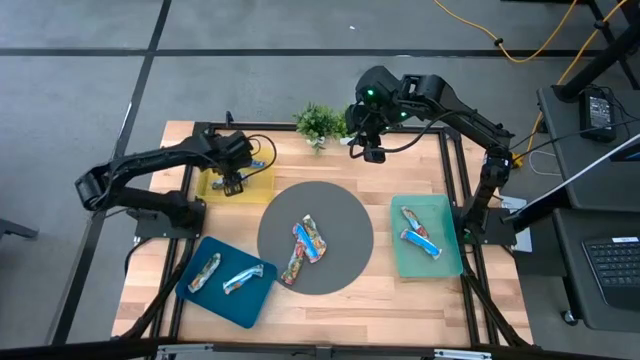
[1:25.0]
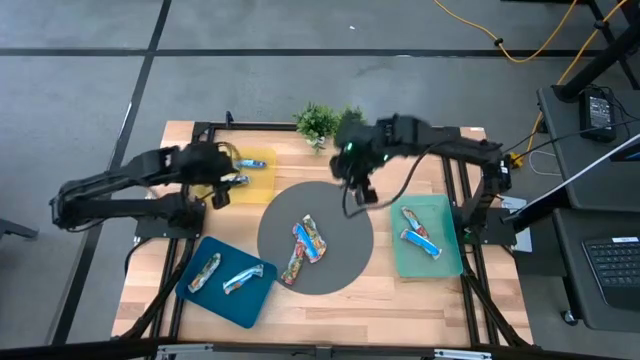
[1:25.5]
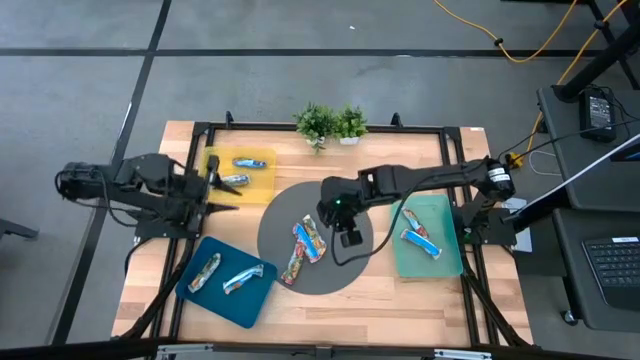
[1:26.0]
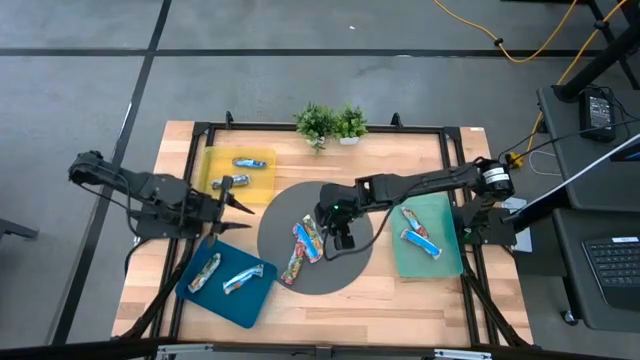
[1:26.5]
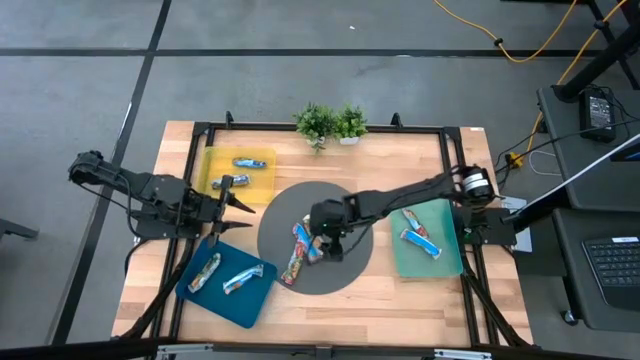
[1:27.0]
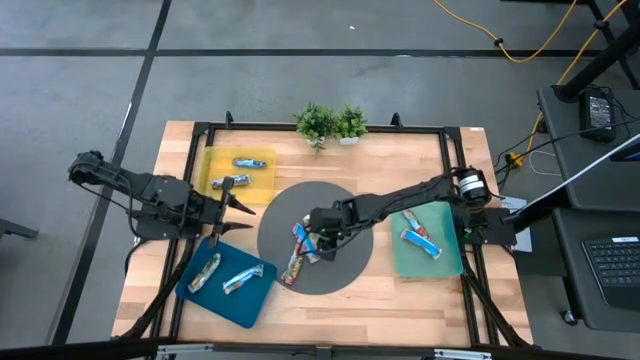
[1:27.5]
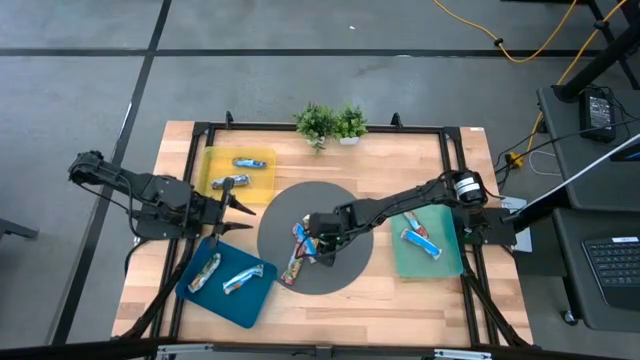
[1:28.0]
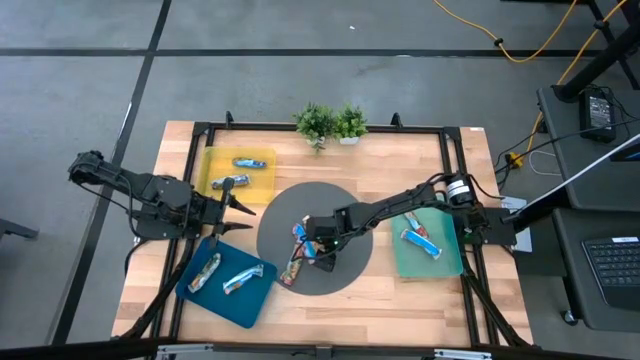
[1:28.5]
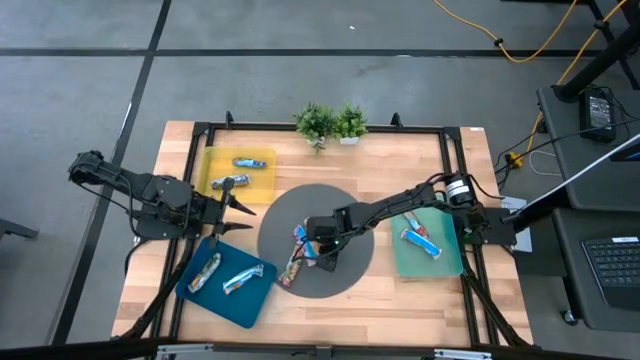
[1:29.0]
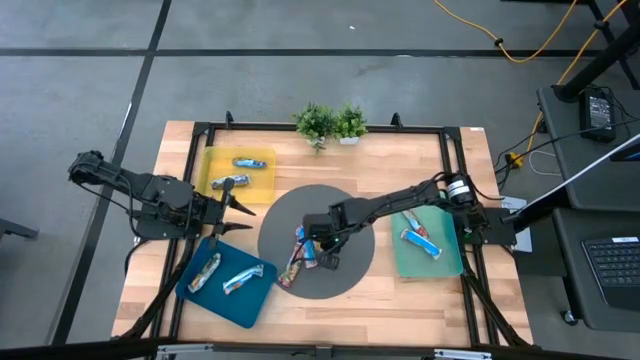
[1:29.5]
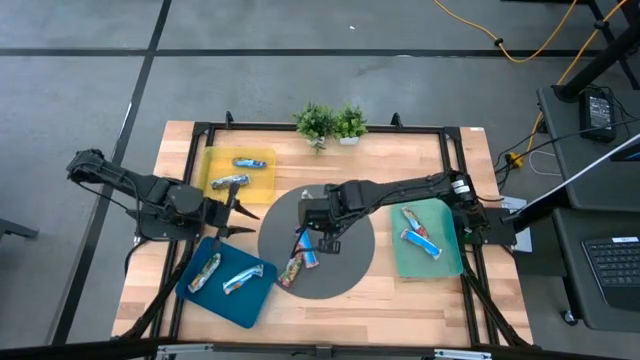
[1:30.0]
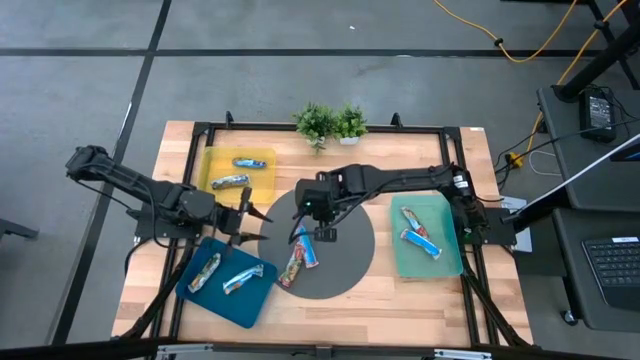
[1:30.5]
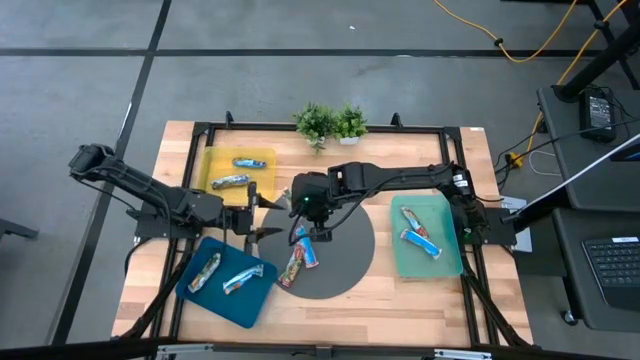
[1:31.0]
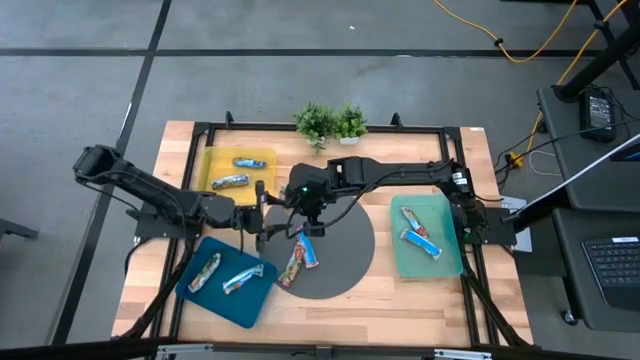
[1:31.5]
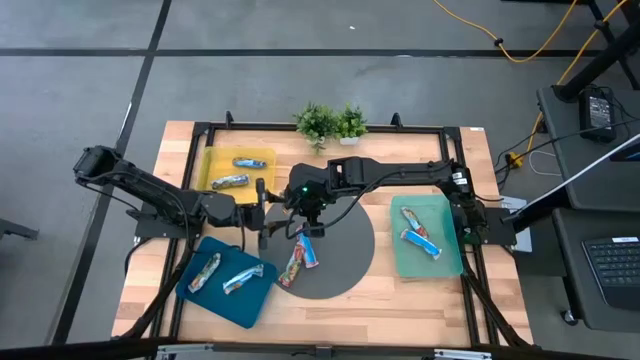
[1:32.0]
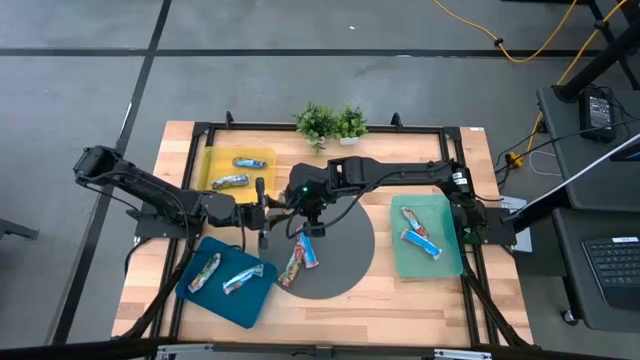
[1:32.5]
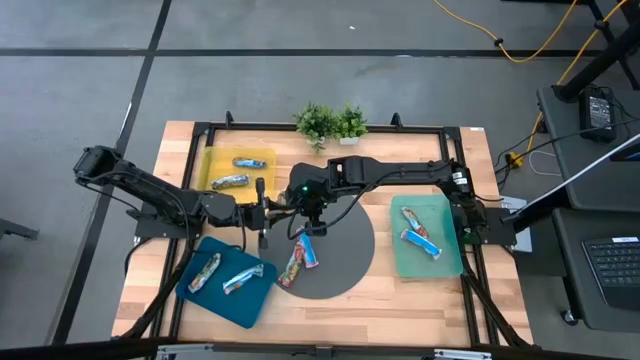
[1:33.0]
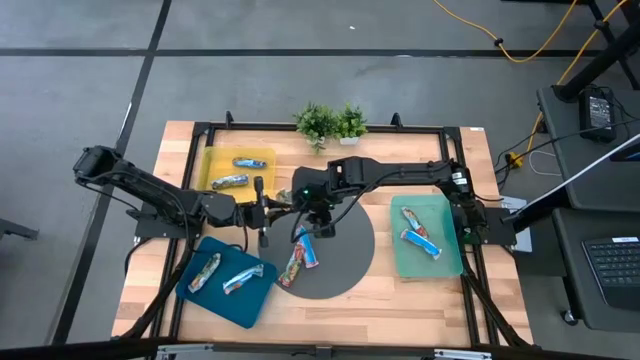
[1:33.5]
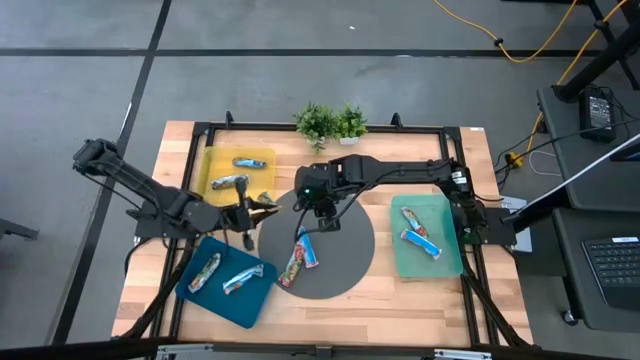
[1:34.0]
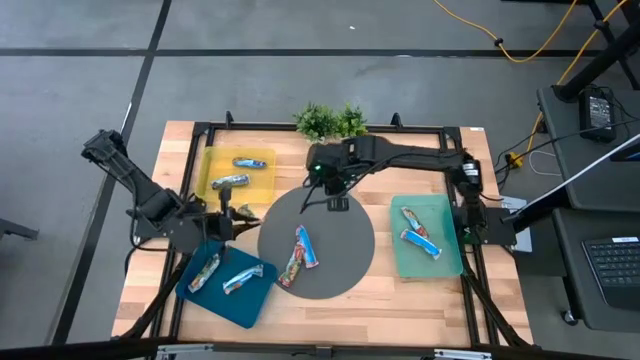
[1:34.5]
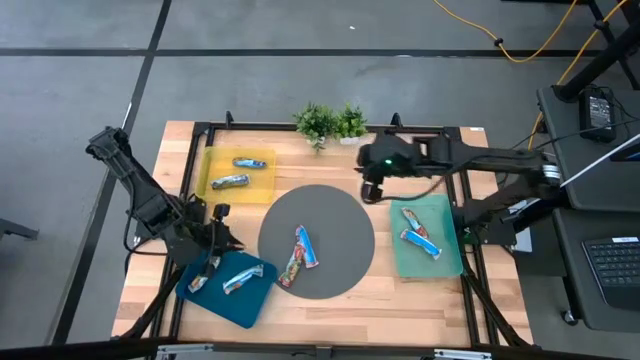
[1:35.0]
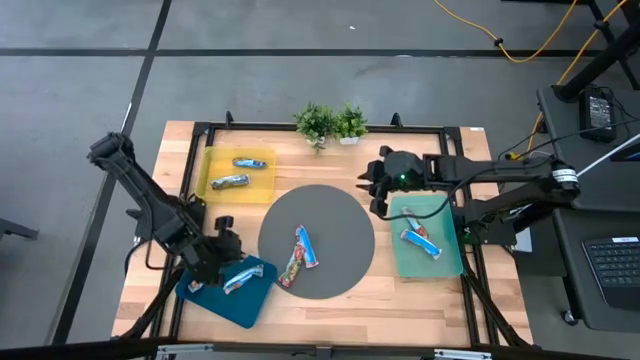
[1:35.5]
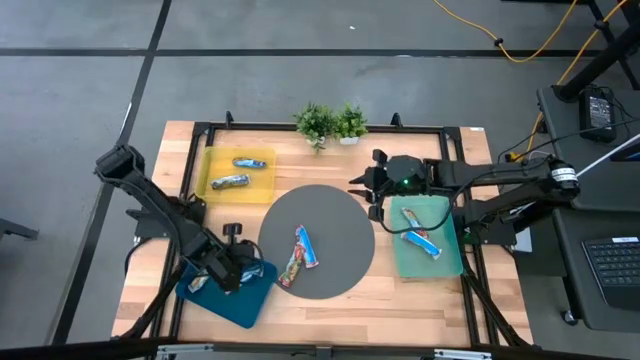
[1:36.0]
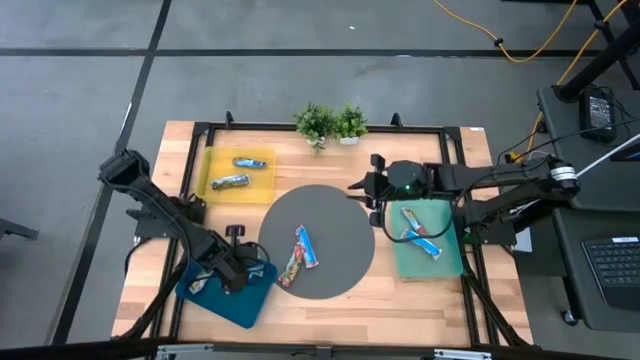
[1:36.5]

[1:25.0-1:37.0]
Task: Pick and place Granola Bars by type
Put the yellow granola bar into the blue bin

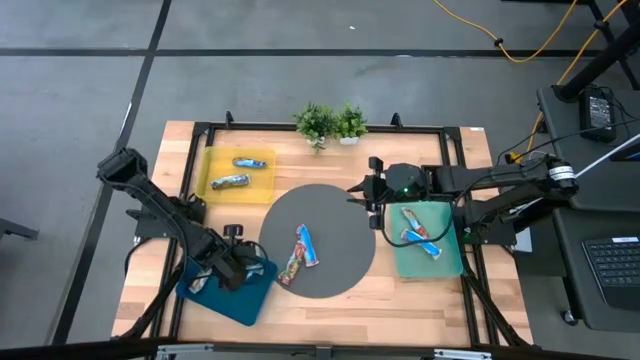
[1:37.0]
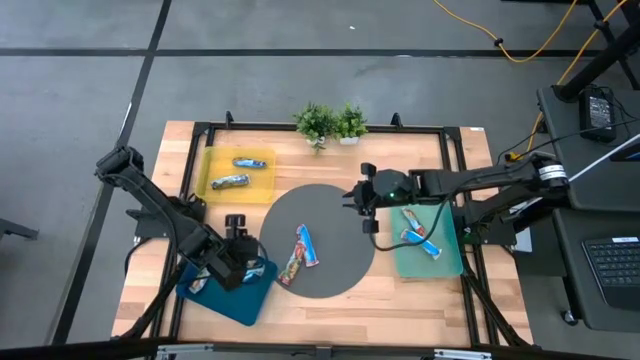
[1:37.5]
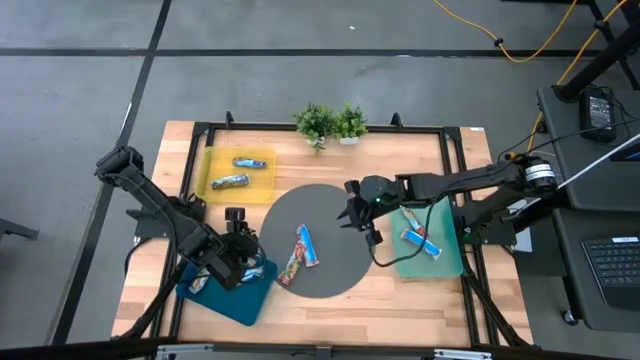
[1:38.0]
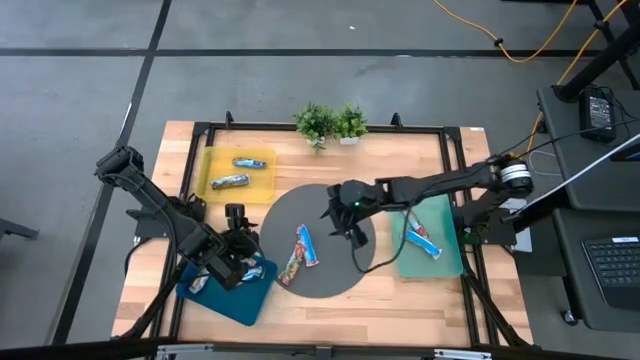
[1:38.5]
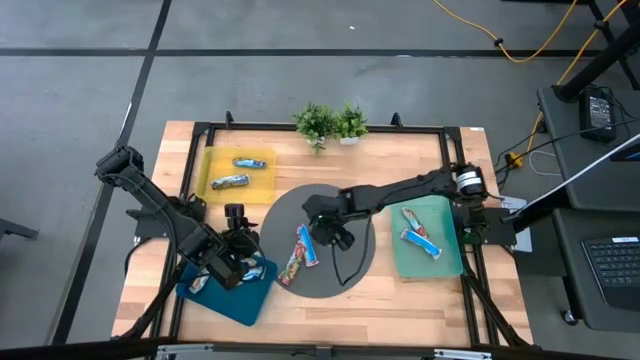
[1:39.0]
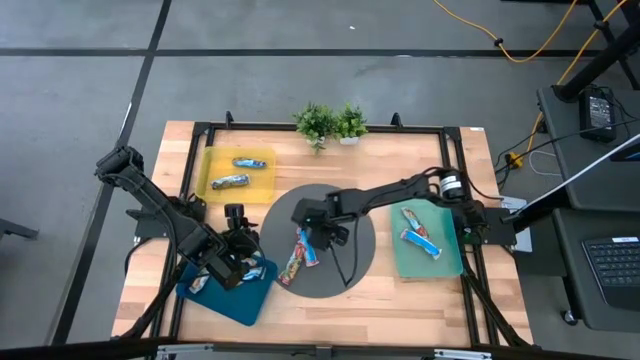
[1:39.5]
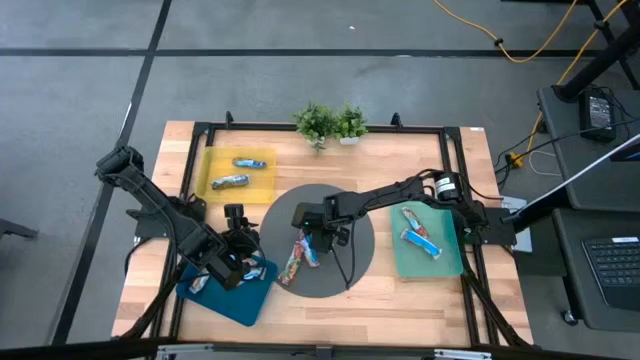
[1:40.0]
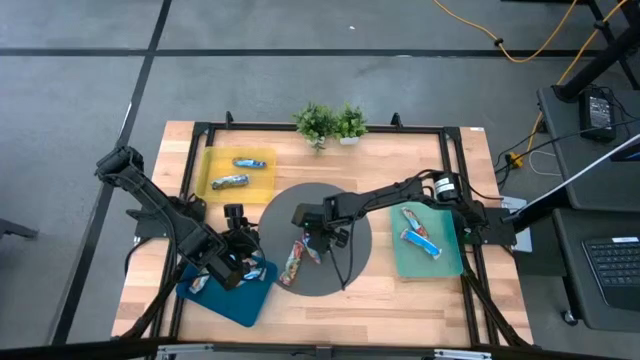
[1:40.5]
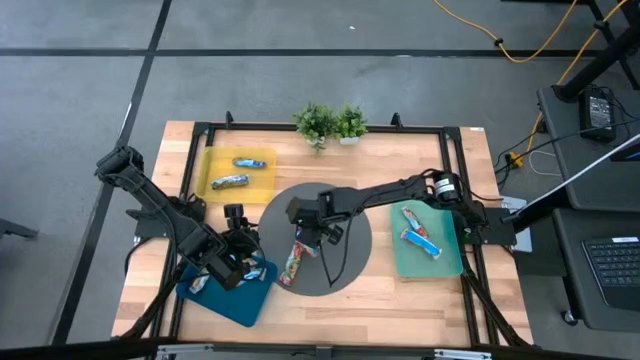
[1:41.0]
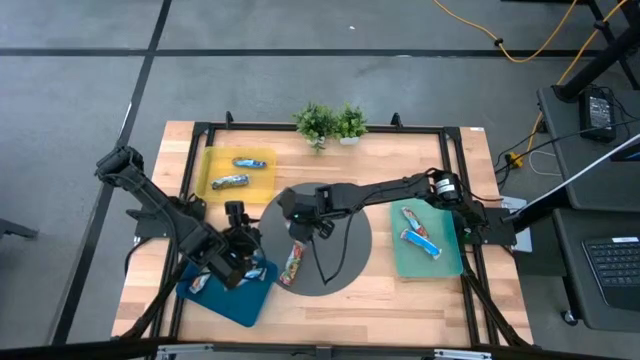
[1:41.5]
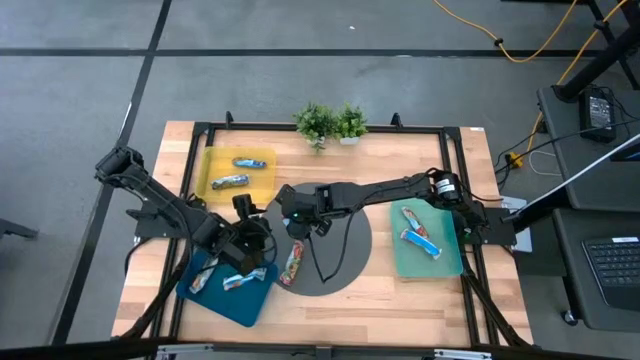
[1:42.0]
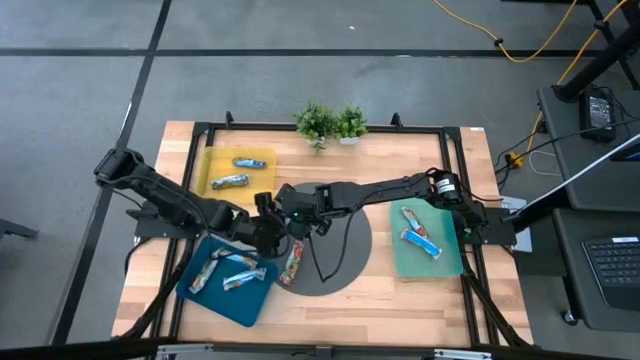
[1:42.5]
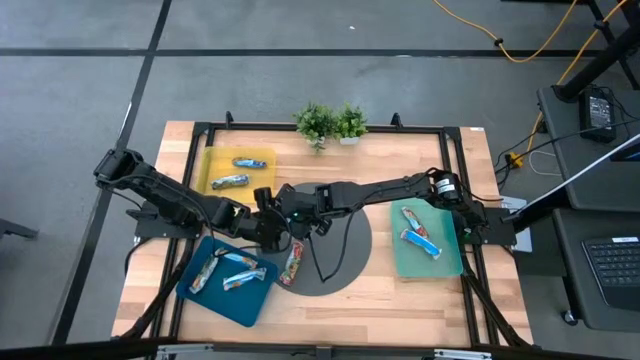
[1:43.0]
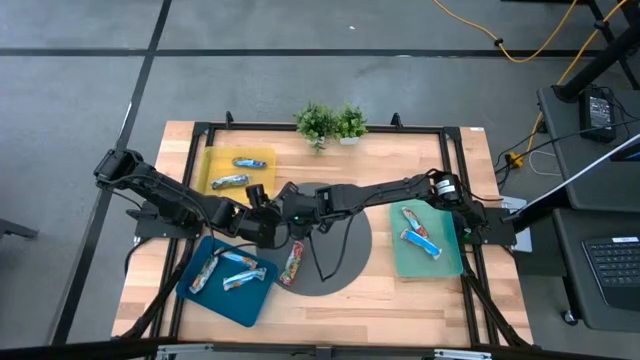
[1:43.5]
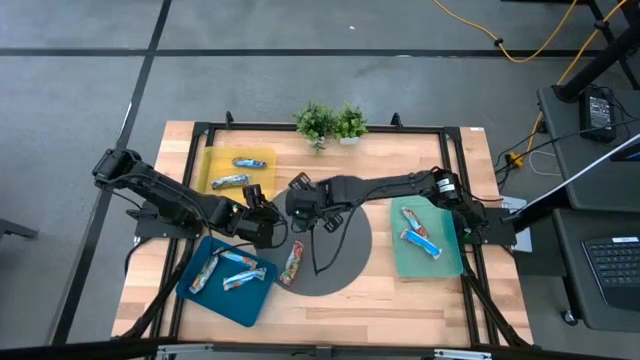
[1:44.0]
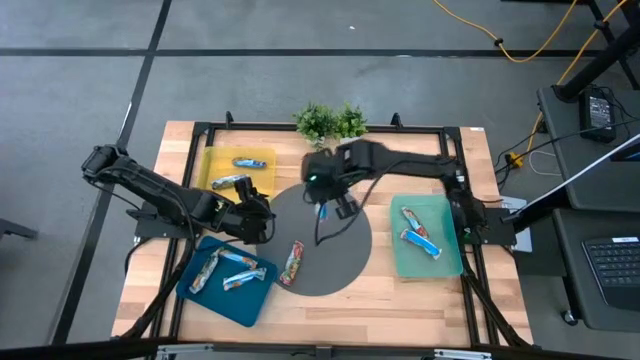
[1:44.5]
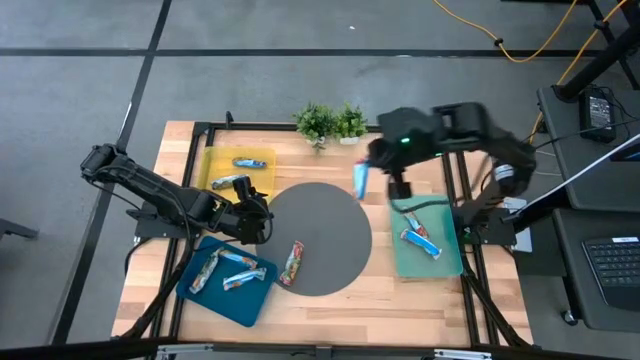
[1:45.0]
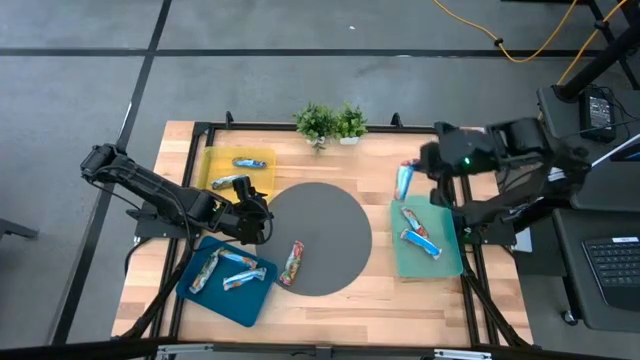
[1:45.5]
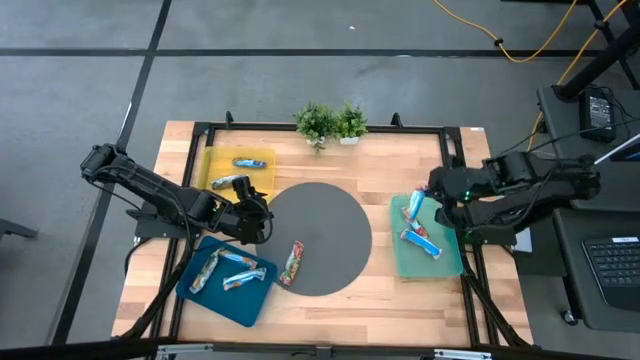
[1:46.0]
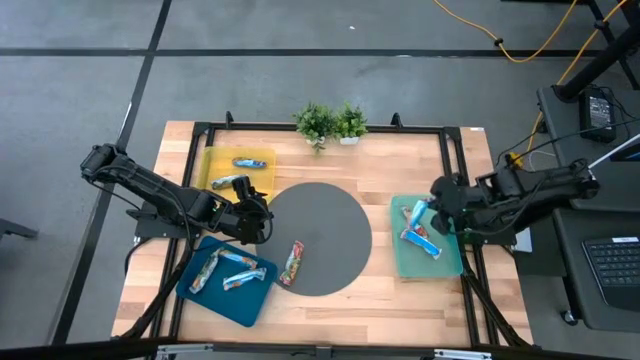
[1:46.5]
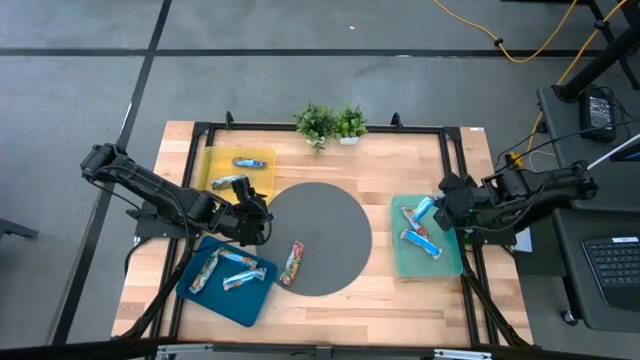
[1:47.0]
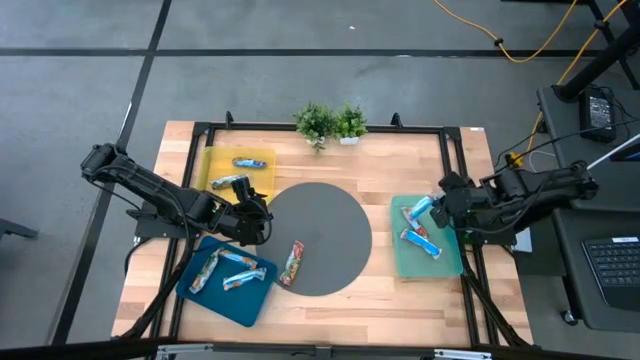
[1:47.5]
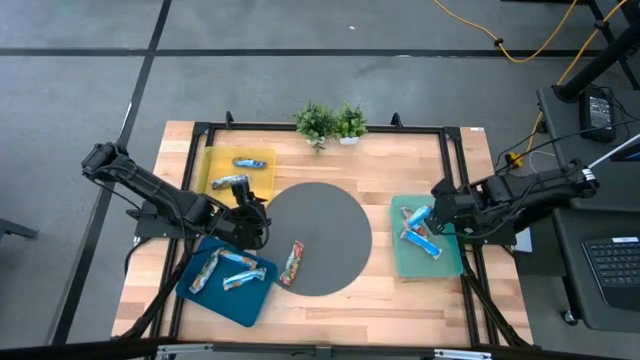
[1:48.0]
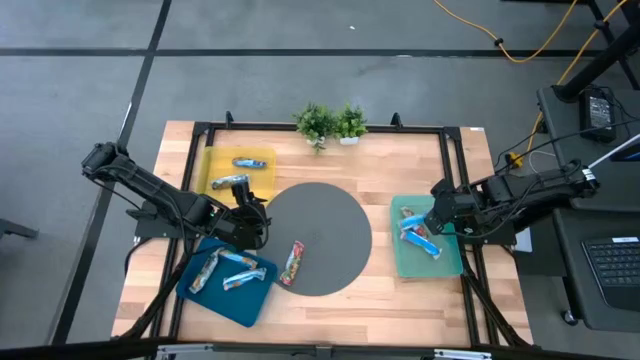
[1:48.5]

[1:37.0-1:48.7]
Put the red granola bar into the green bin
